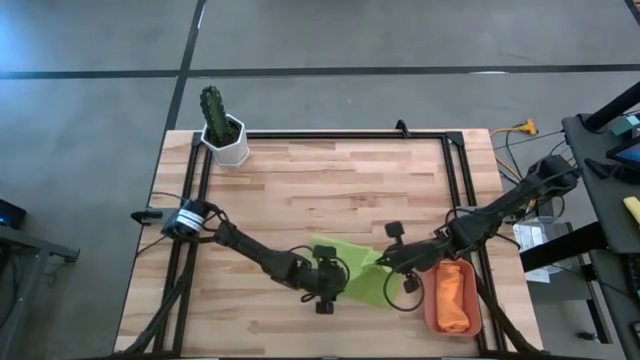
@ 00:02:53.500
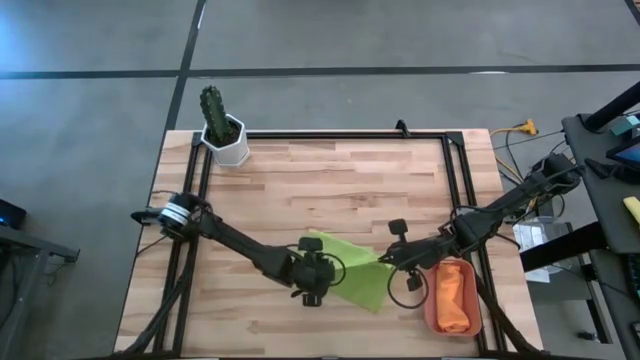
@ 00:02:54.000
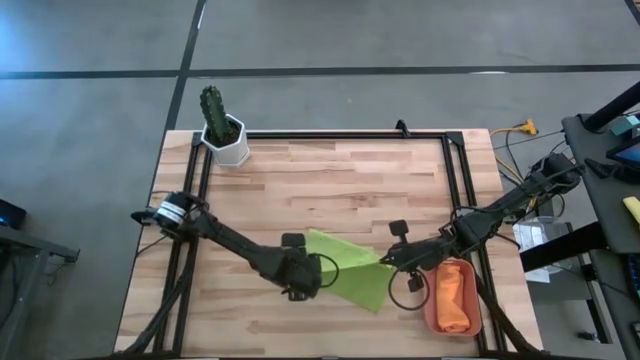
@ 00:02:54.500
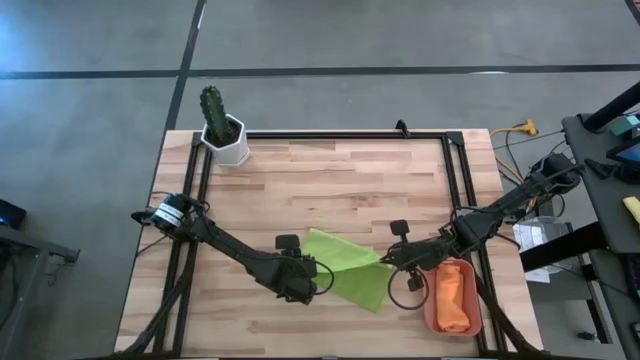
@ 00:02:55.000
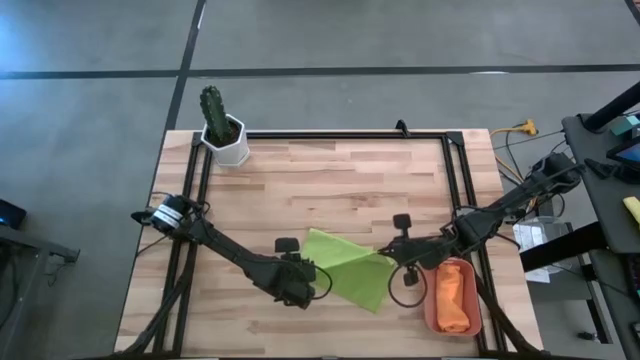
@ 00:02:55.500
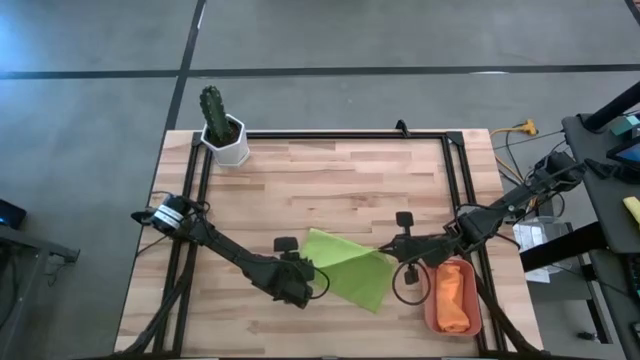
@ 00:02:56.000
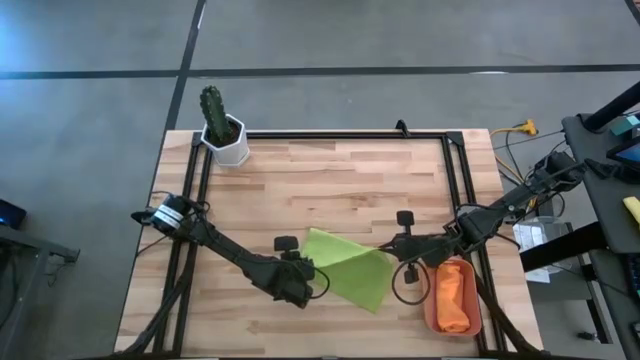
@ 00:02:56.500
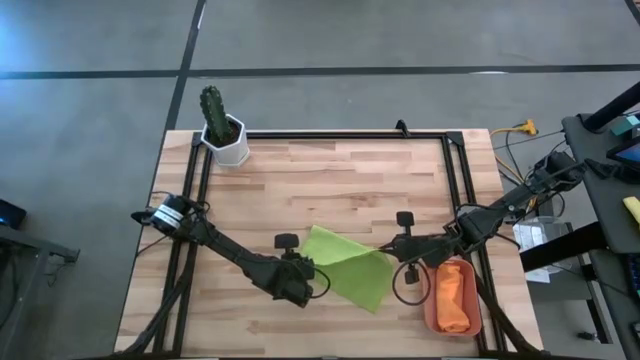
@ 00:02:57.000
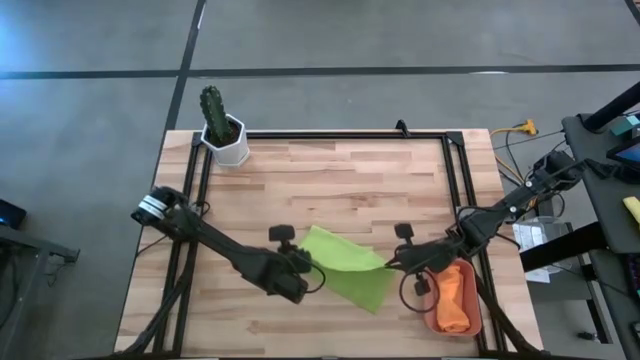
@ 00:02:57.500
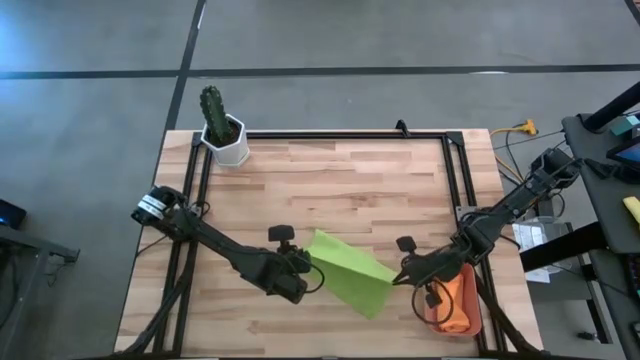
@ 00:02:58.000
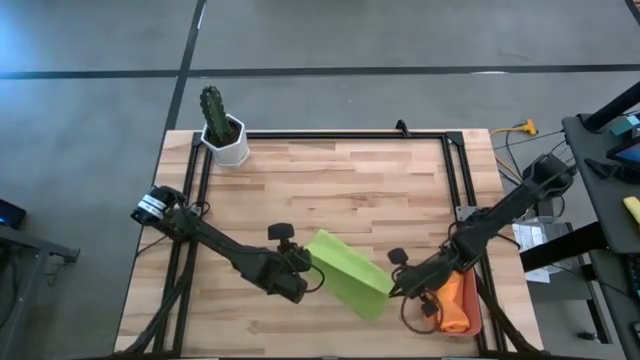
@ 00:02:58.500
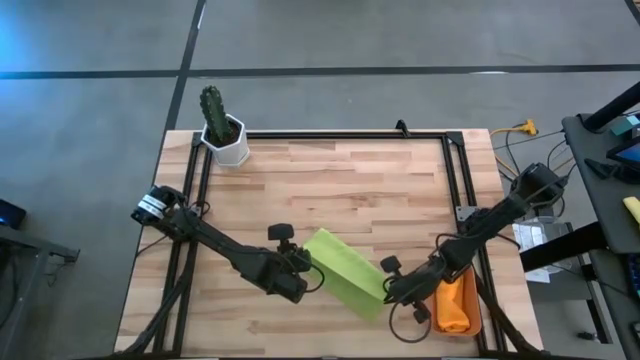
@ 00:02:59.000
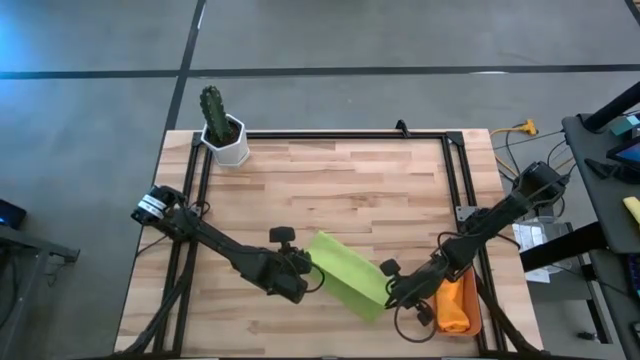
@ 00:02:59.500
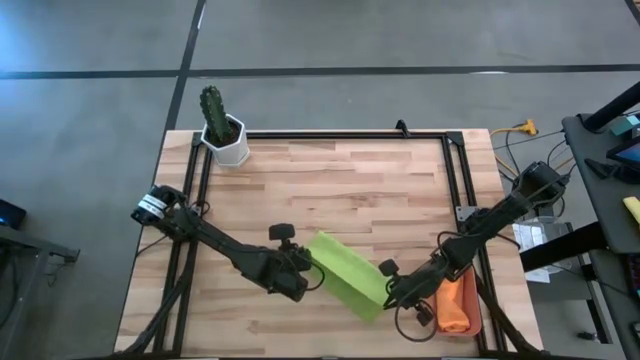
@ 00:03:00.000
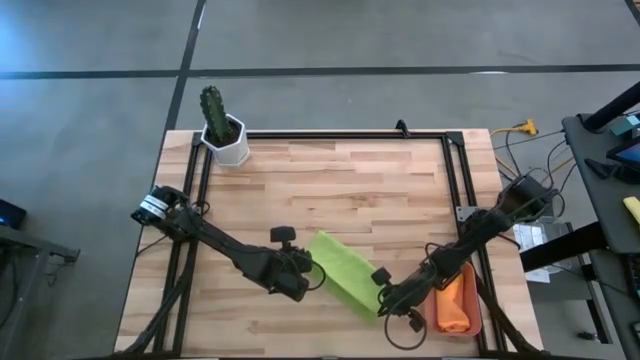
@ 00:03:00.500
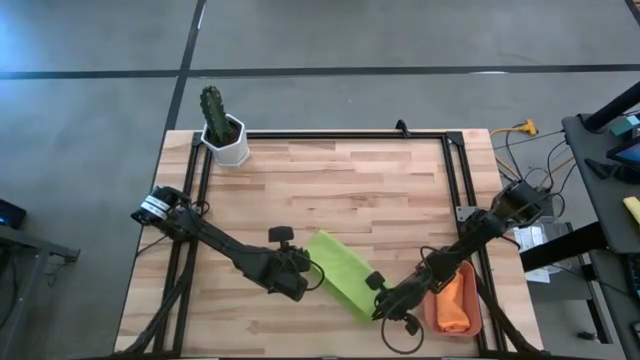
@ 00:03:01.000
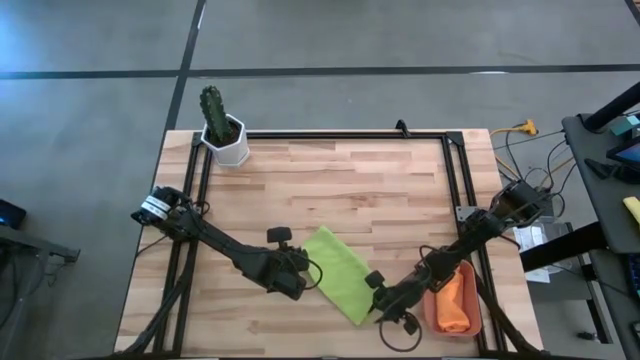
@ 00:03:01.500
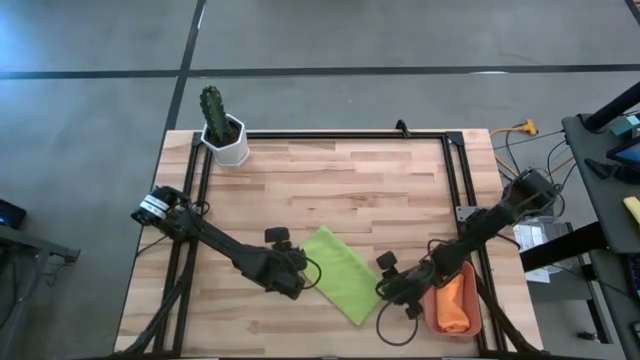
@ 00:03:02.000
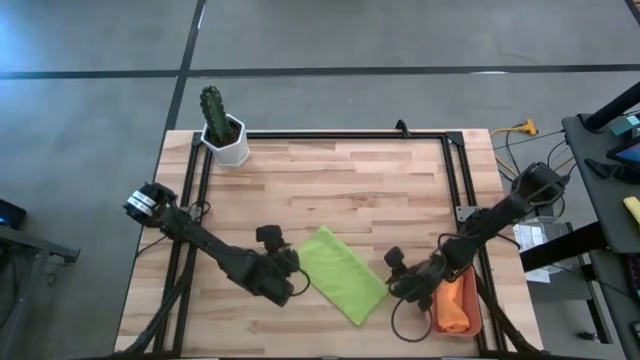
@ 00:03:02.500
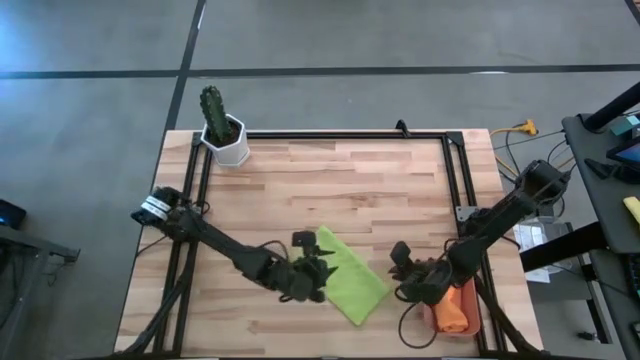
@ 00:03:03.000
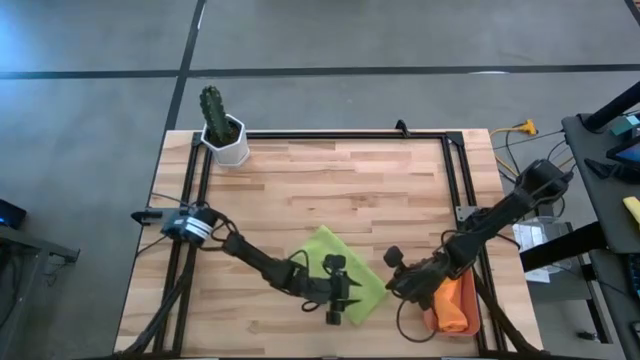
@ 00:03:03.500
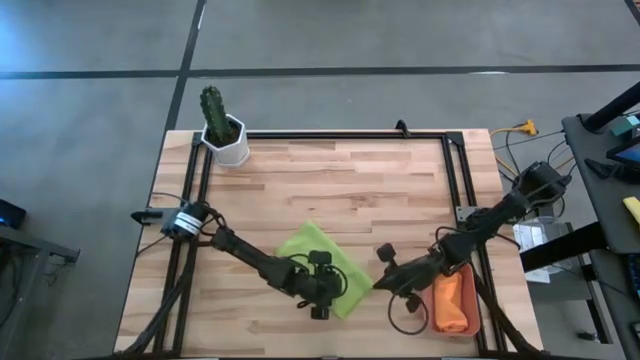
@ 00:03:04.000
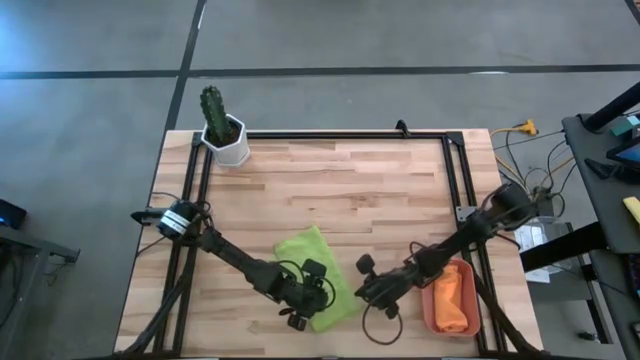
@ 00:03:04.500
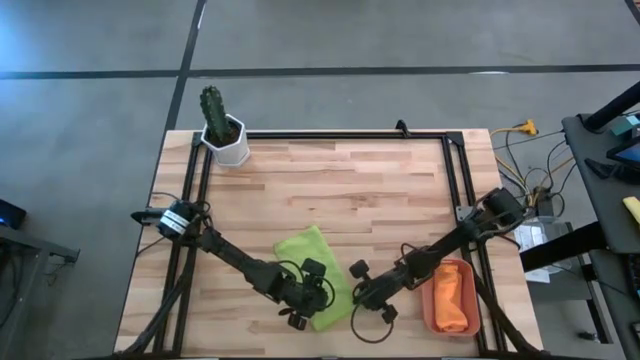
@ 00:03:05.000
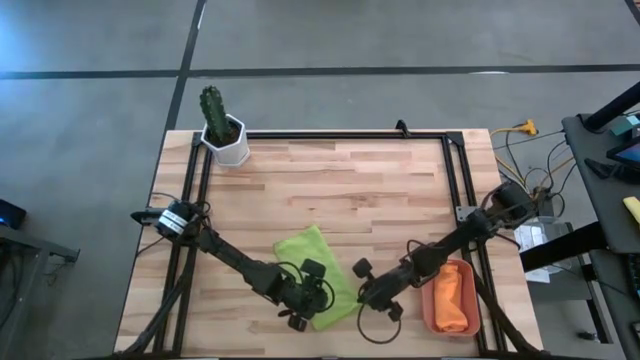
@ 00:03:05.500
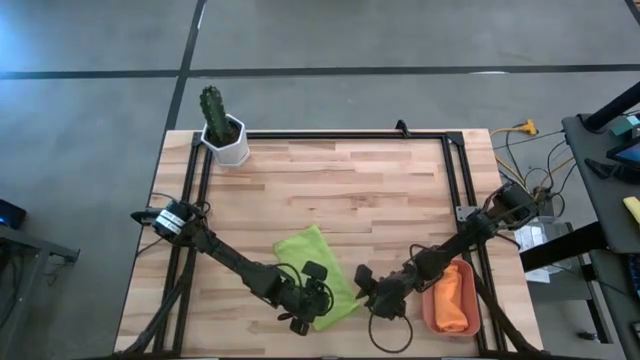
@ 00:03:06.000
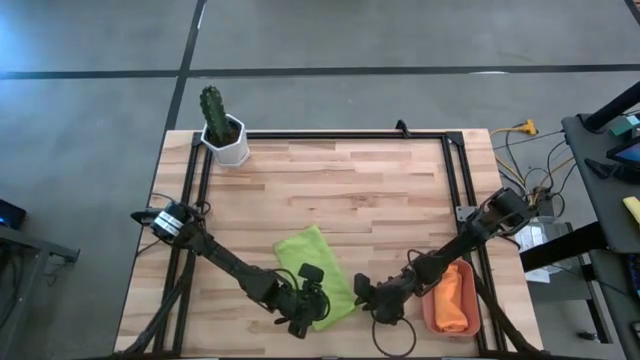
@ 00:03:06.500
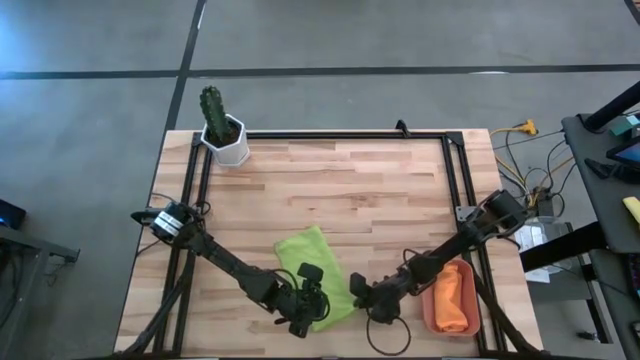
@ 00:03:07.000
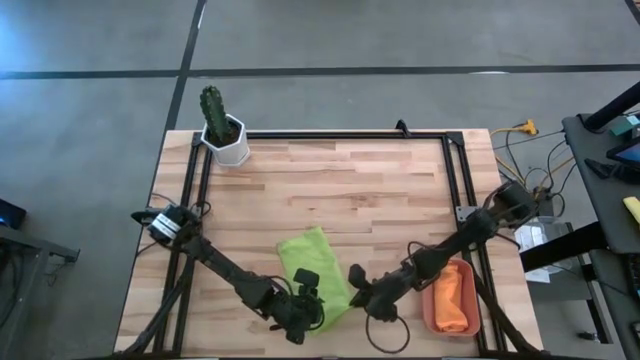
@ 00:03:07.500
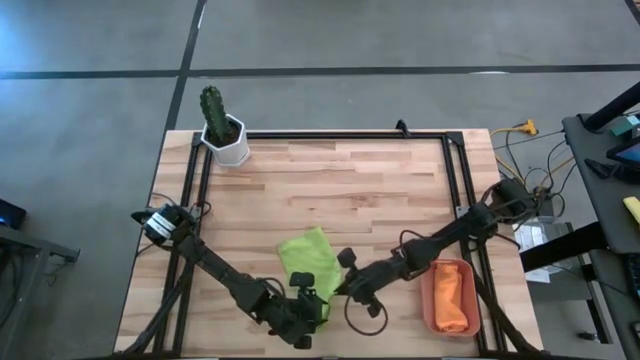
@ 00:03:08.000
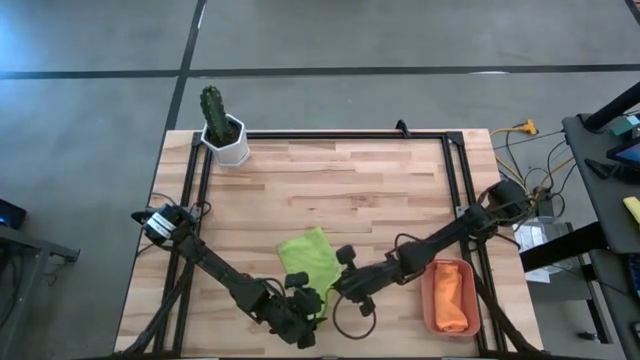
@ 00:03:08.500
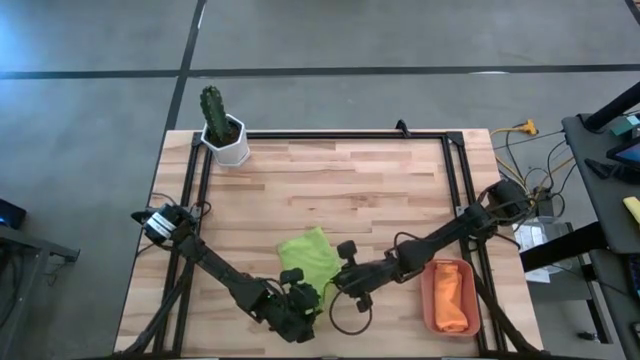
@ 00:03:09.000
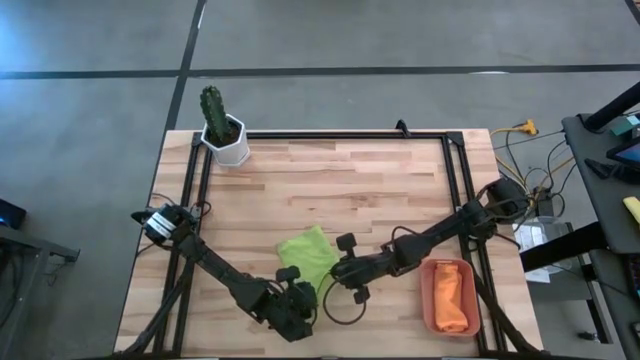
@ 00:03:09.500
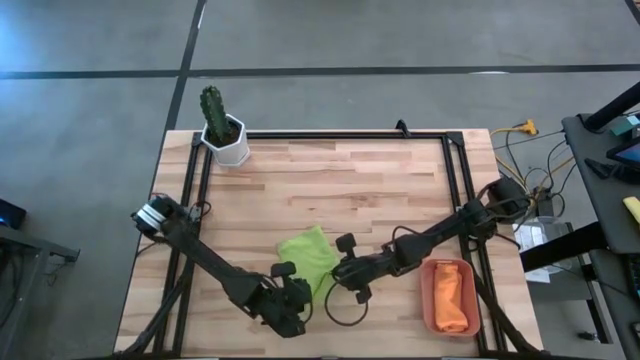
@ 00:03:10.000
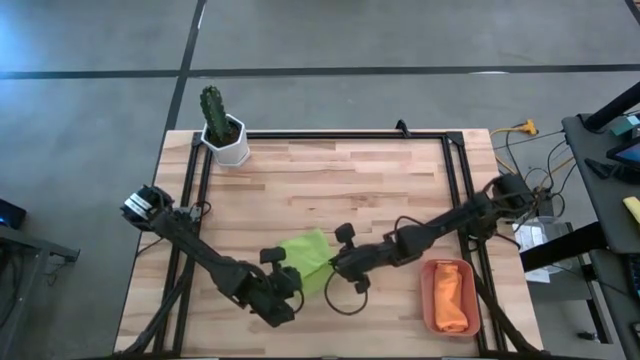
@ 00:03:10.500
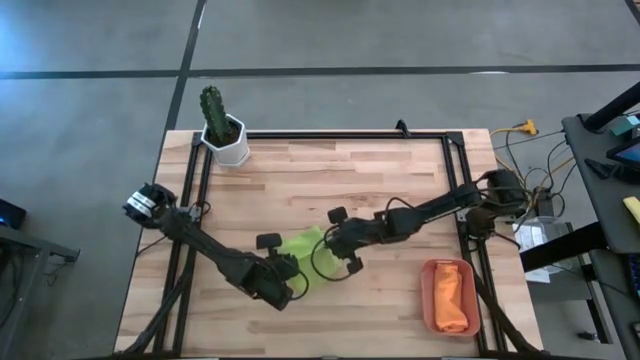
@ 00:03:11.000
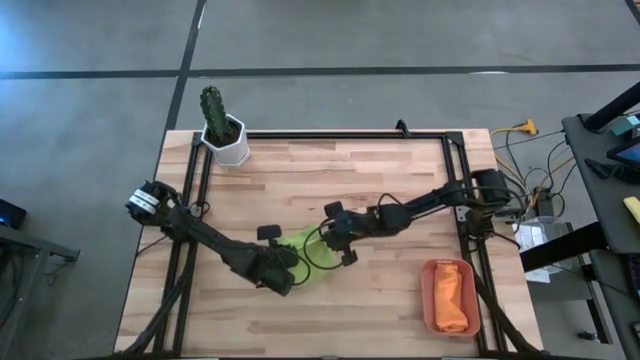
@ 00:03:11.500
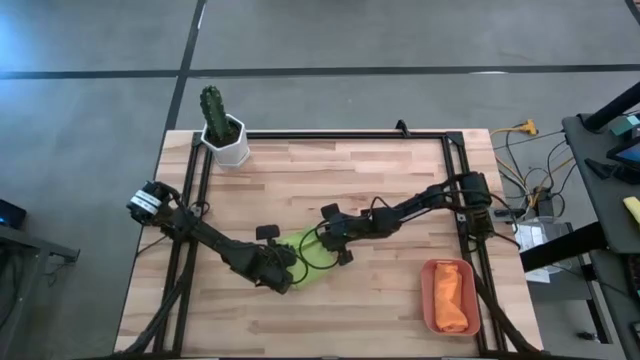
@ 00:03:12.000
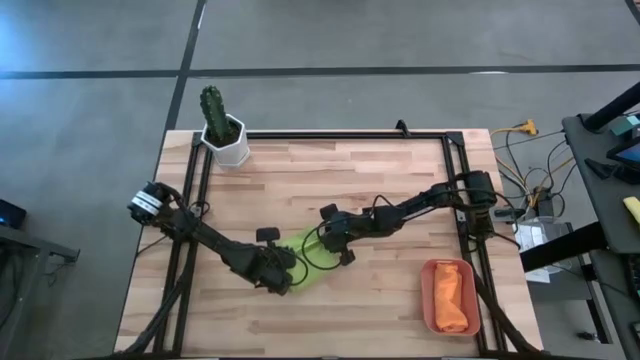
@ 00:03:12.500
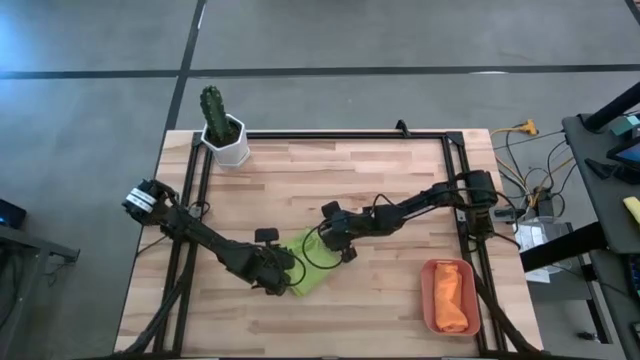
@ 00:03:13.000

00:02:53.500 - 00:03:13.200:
Task: Roll microfiber towels into tight, uniform cylinder then place into a basket
Fold the green microfiber cloth
